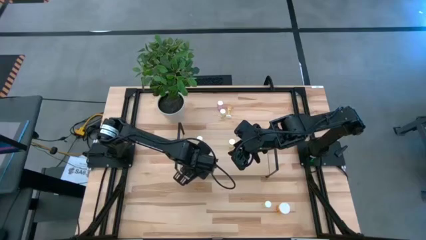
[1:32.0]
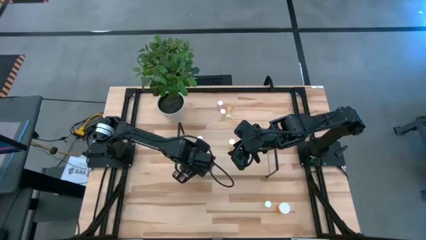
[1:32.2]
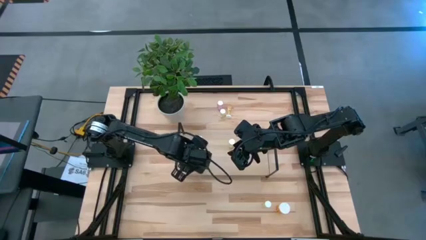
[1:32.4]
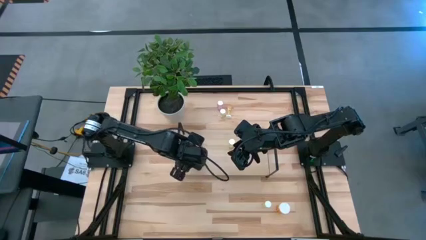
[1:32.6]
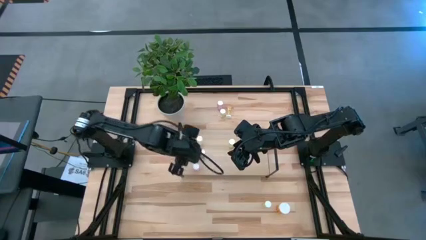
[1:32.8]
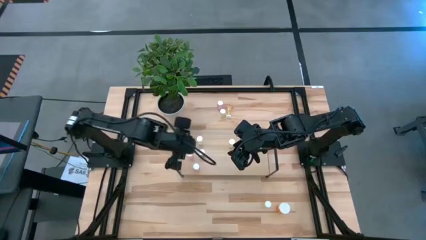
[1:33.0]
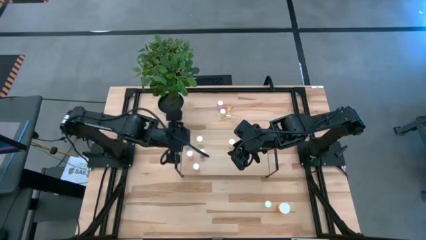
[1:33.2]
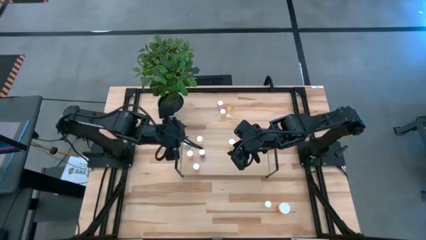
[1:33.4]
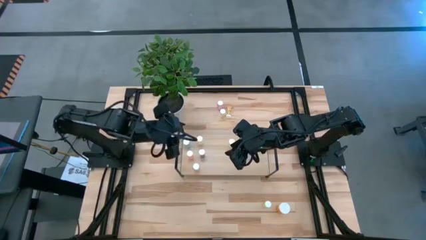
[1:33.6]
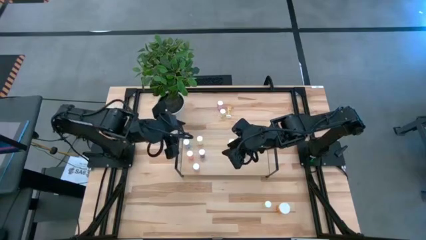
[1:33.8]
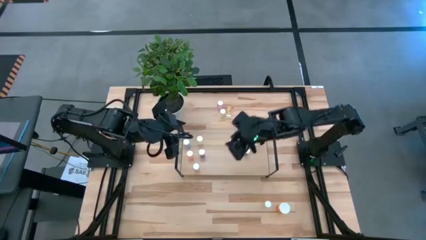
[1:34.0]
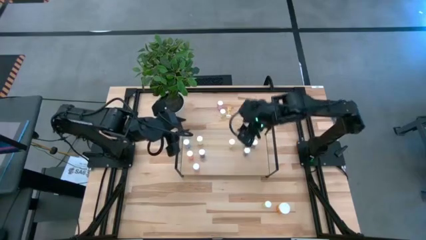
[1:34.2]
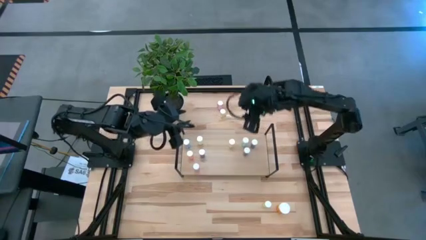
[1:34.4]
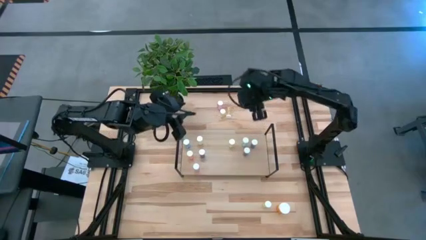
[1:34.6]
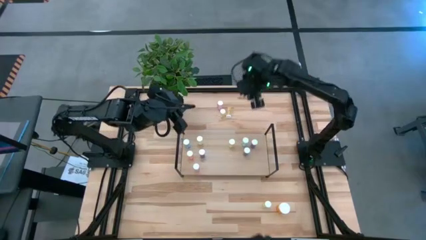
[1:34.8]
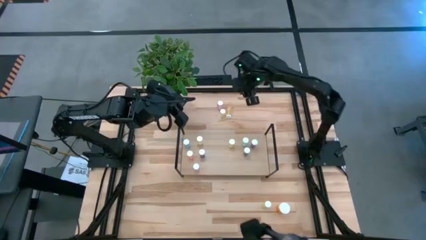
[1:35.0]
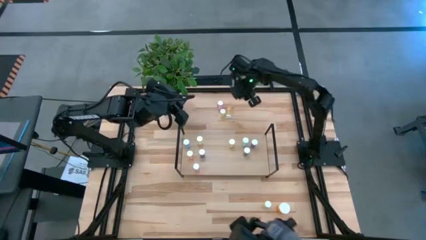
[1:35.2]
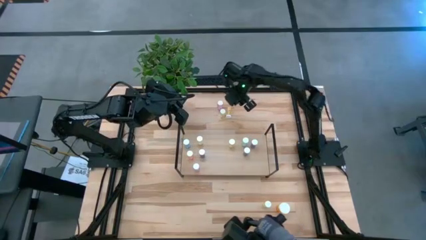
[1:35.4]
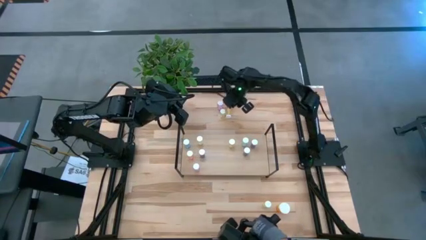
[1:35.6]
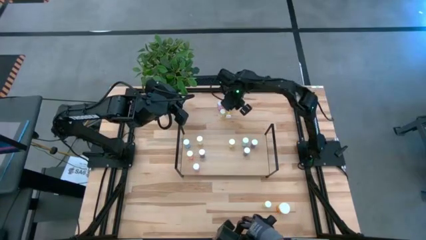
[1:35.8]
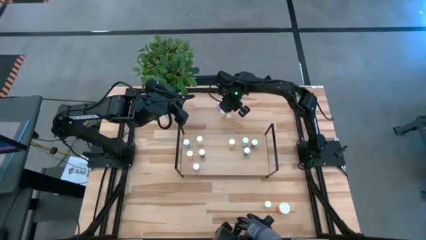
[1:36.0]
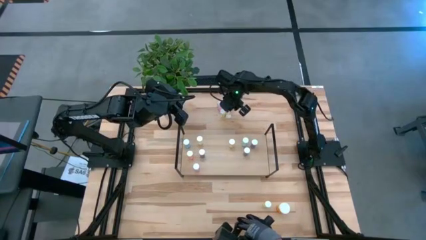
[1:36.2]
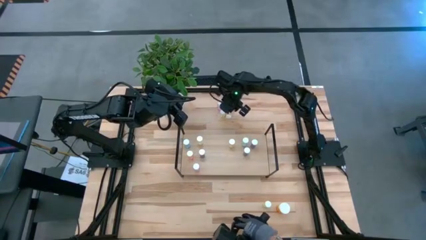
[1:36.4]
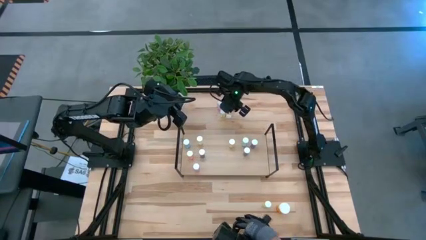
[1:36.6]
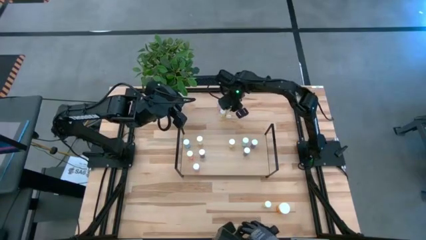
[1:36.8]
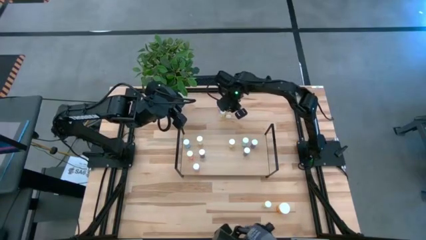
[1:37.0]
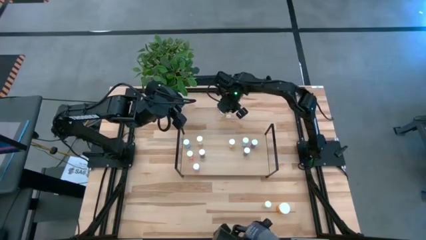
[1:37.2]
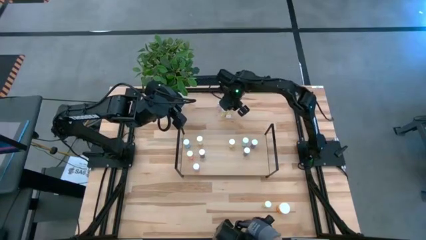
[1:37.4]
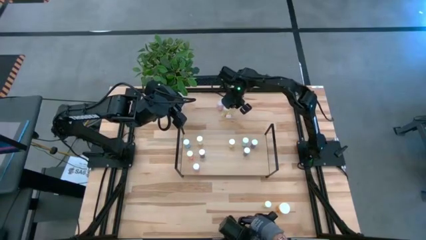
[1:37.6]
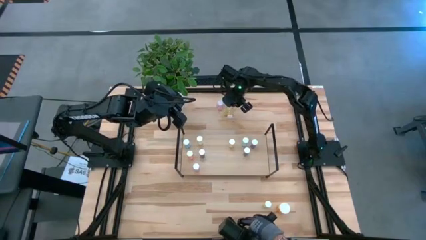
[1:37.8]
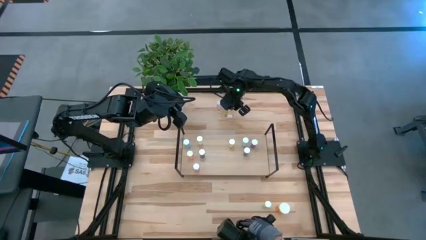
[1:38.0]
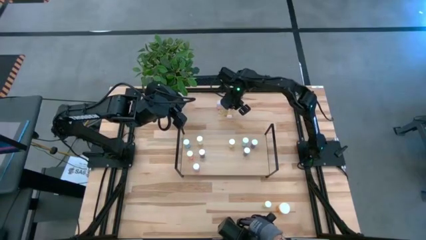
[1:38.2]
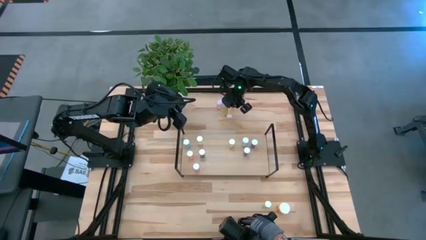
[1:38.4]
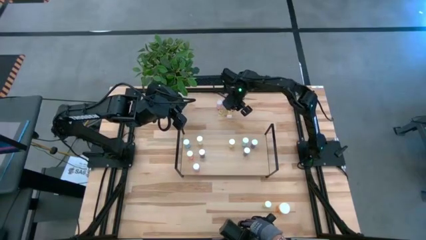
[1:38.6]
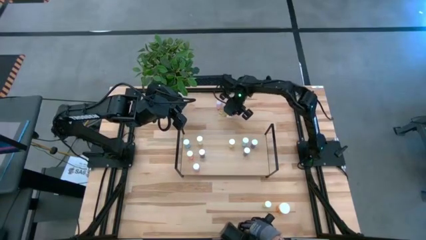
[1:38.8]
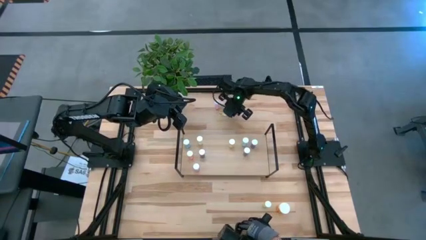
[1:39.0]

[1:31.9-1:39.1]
Task: Pick and place medicine bottles onto shelf by color
Put the yellow pill bottle on the shelf

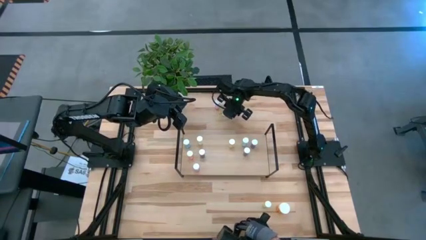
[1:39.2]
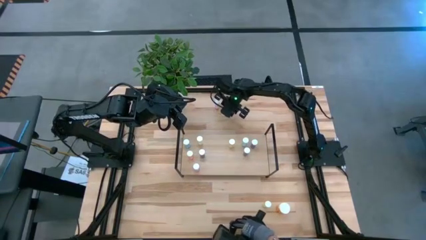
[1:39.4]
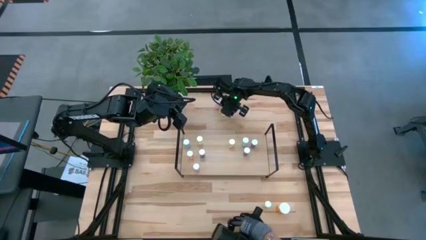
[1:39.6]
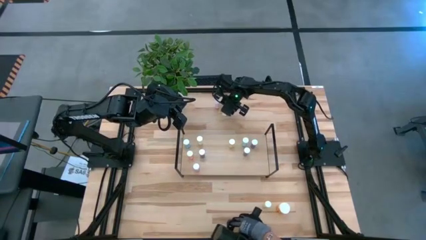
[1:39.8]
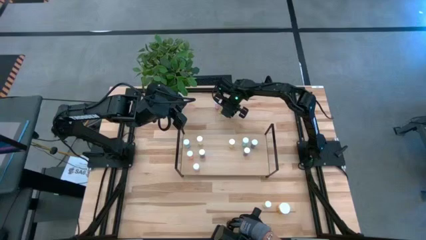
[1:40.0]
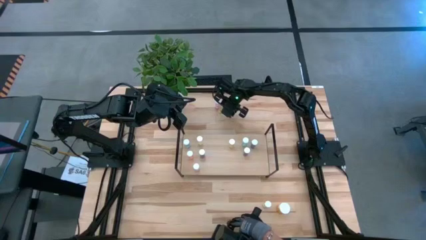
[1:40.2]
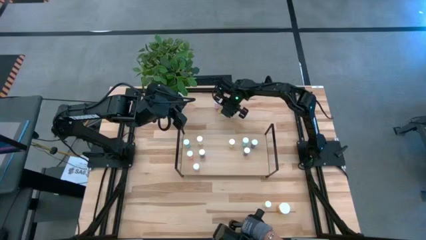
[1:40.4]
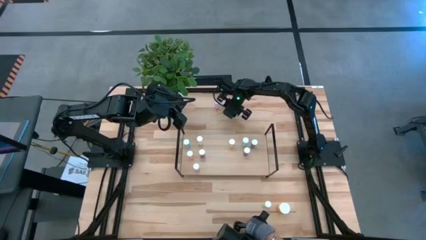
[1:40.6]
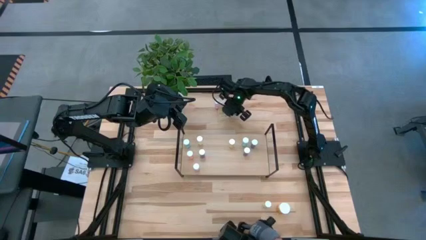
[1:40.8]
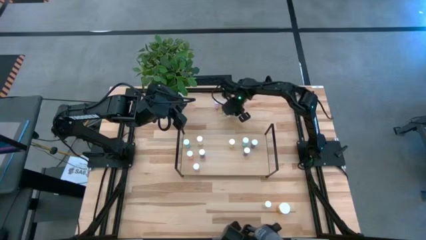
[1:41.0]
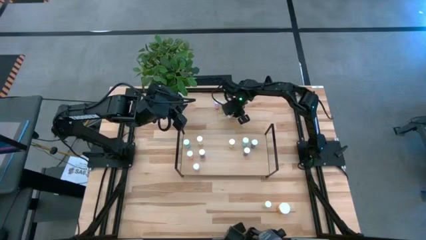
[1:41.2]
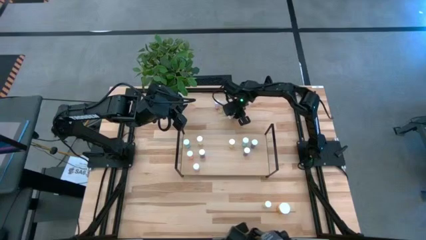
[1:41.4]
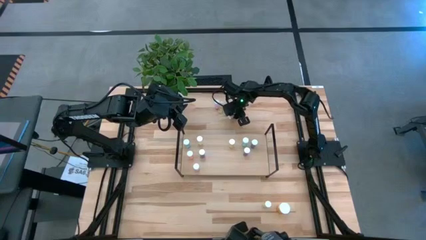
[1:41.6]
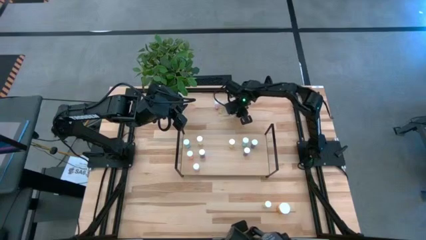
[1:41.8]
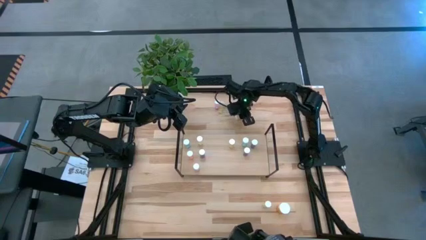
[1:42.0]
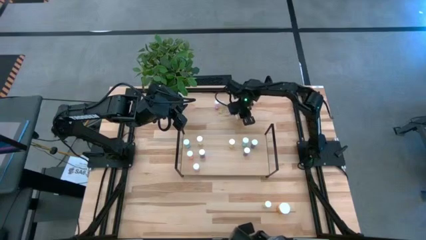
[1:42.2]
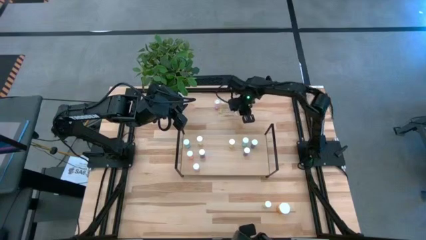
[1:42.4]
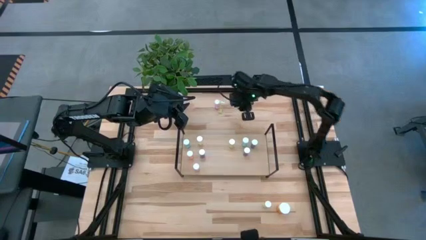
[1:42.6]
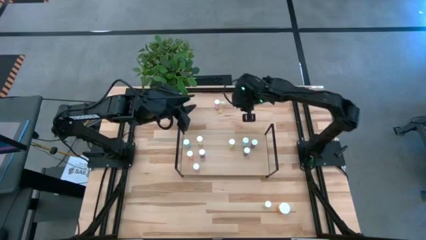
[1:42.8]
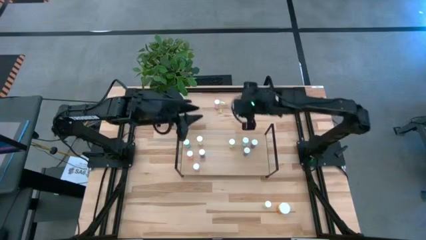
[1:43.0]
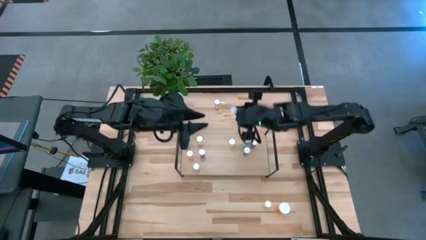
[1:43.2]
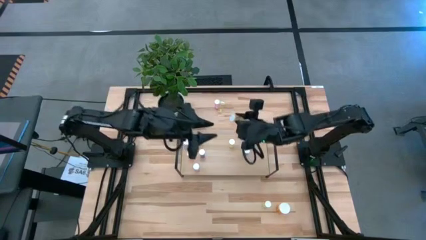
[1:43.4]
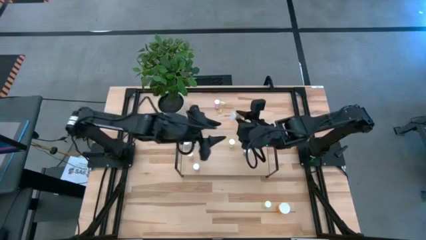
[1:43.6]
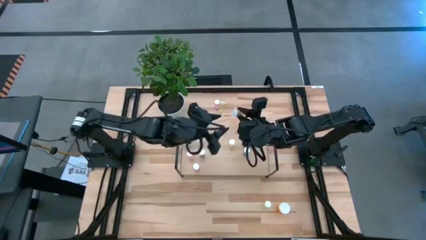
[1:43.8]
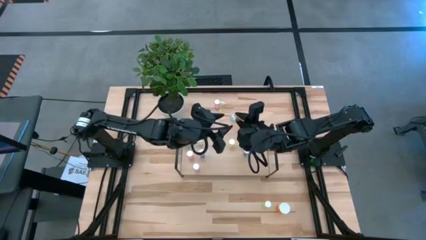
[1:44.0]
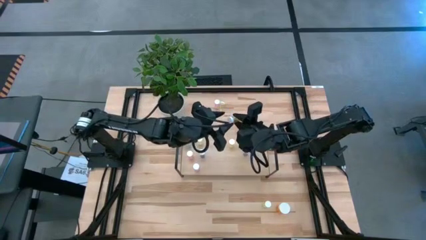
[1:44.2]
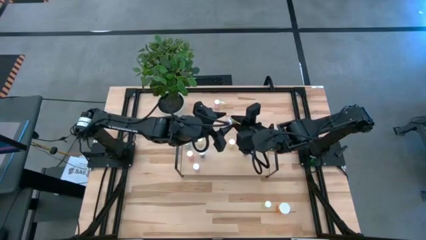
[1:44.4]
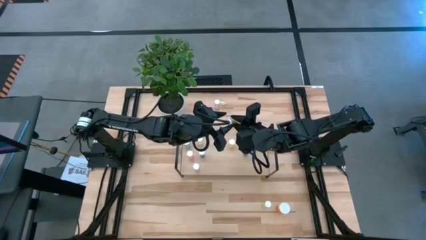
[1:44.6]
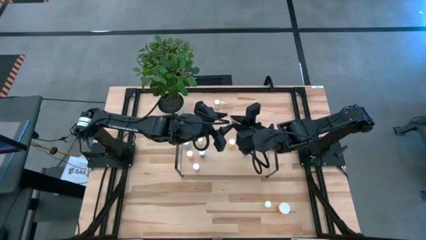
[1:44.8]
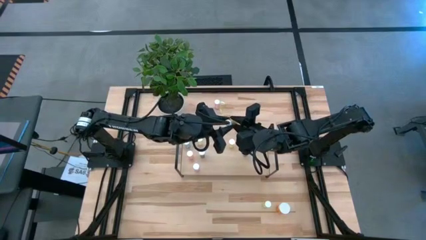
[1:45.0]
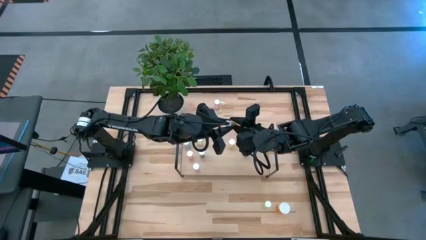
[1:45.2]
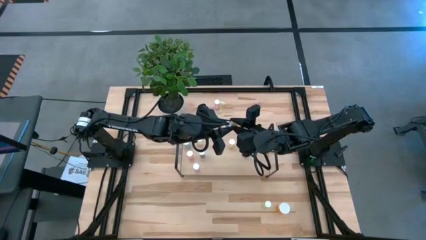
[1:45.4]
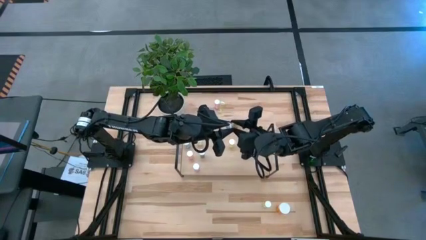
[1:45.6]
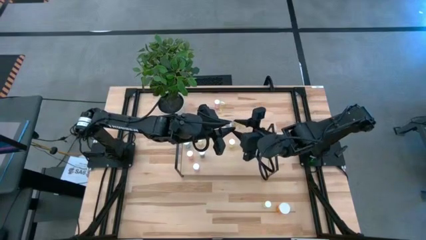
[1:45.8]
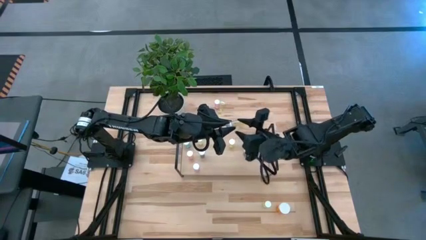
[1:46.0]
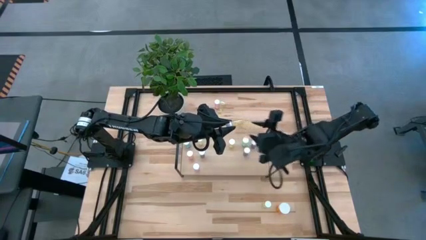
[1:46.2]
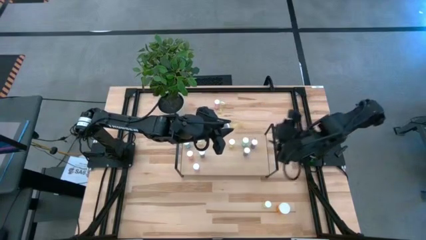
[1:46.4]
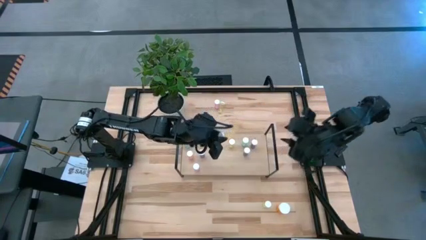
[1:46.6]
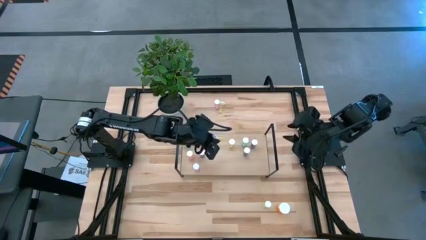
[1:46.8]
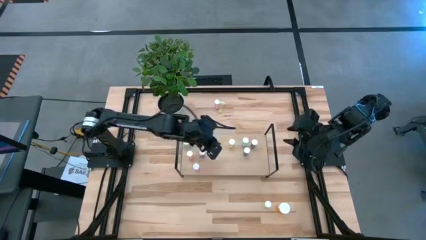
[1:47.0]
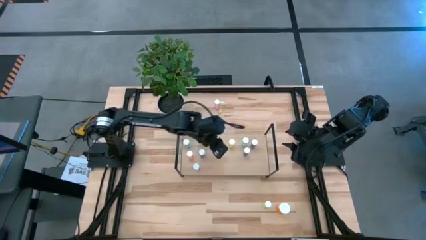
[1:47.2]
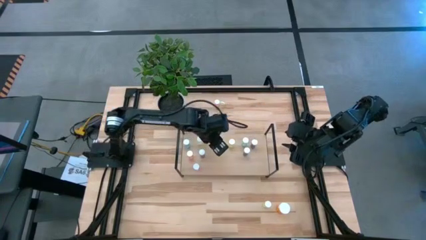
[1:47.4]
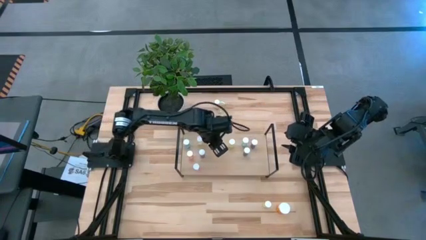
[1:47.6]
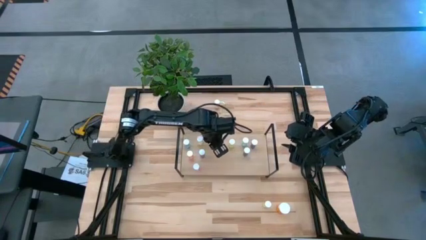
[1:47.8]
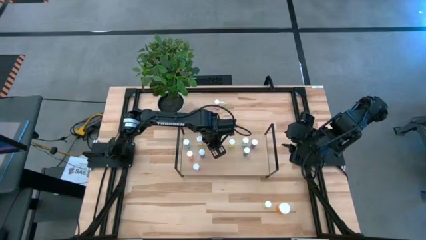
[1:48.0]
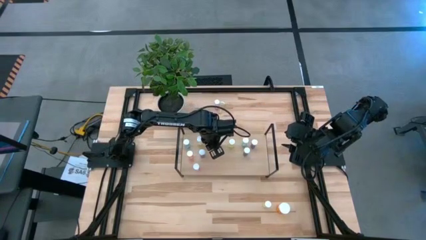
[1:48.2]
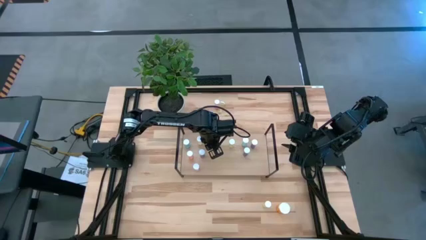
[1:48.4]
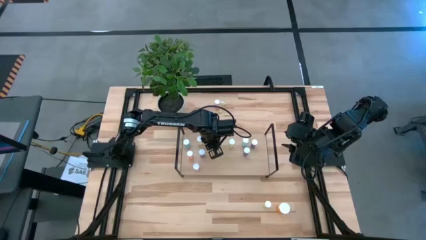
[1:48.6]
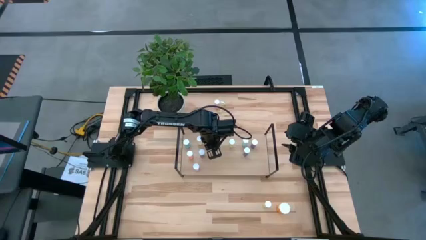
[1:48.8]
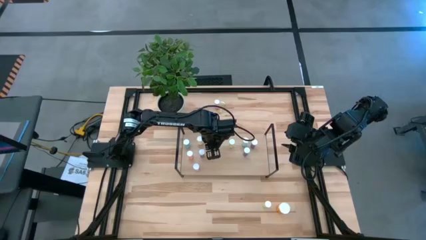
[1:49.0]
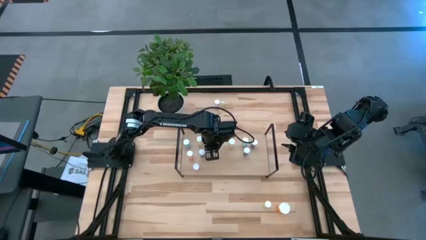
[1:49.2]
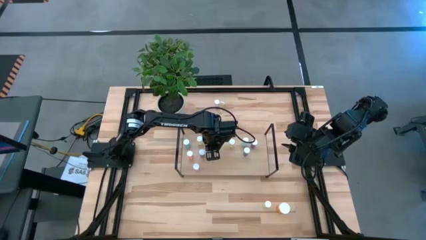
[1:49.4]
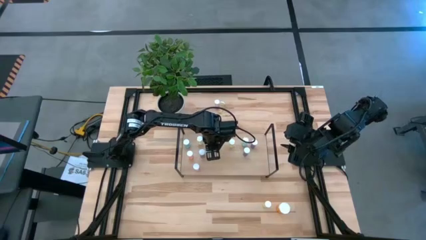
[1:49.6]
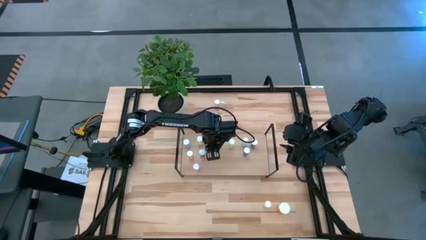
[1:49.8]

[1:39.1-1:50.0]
Put the yellow pill bottle on the shelf
